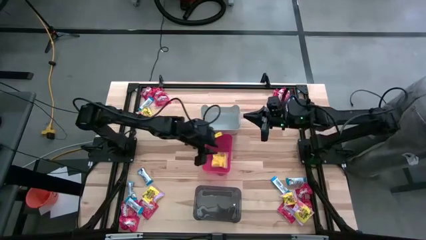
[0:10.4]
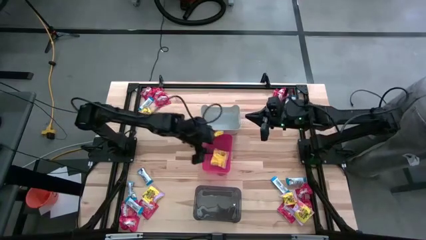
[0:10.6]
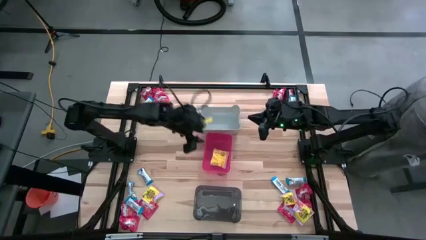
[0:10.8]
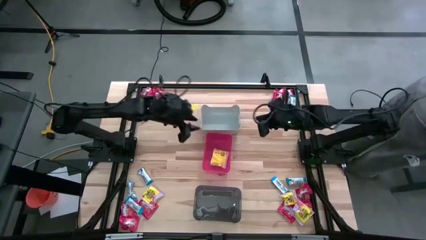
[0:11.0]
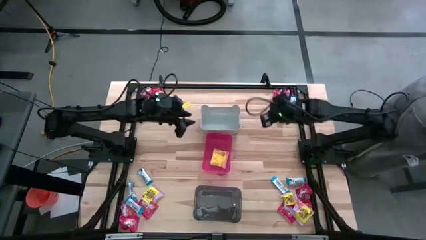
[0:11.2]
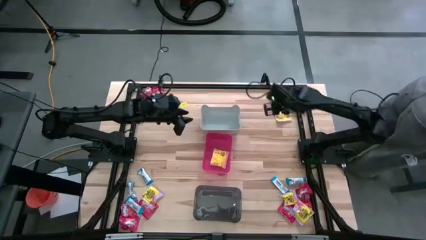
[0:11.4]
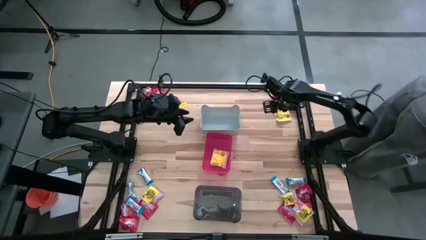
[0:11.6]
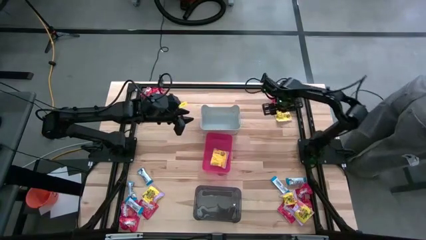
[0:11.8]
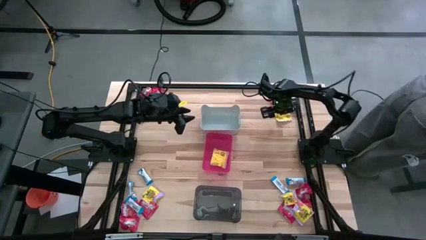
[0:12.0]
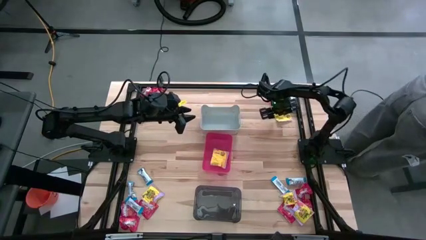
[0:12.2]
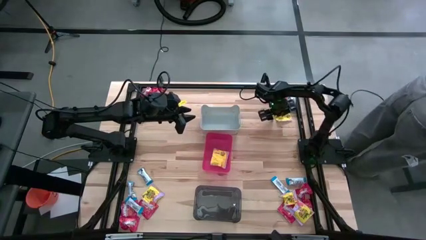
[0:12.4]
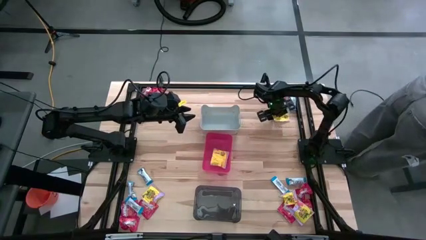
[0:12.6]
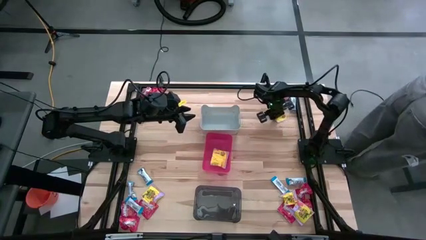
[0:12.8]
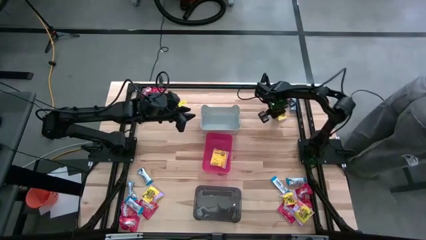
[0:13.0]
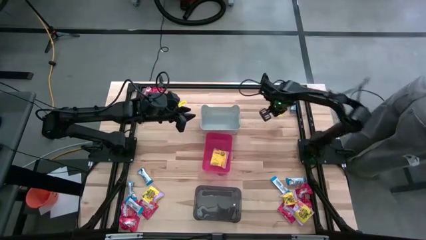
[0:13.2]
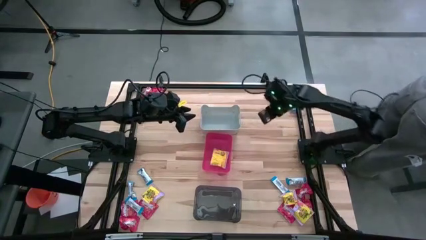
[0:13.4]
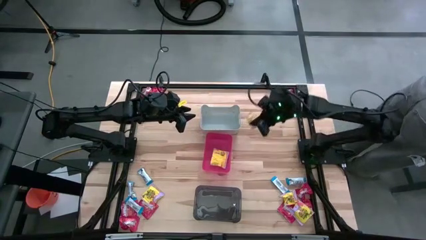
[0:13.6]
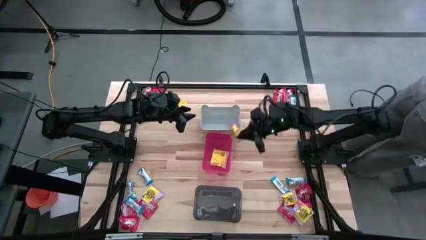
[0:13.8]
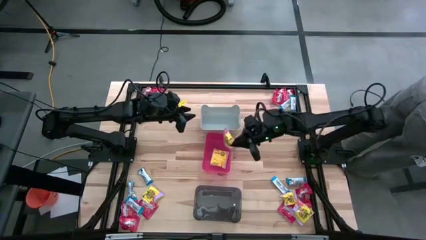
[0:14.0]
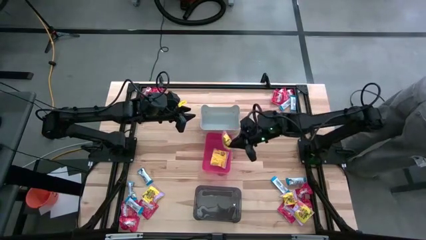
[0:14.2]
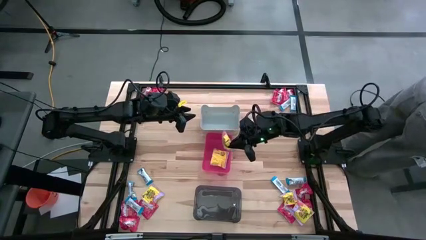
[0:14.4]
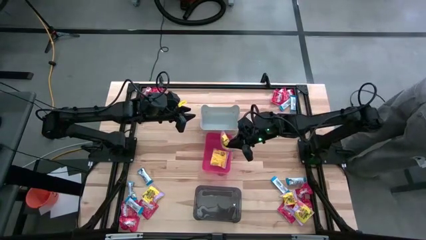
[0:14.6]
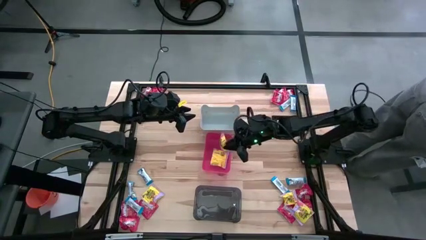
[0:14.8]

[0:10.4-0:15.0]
Task: Sort candy
Put the yellow candy into the red bin

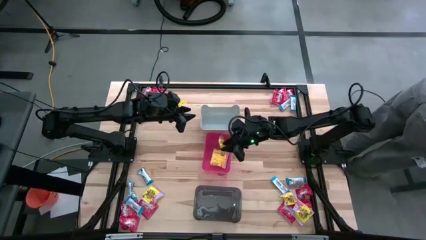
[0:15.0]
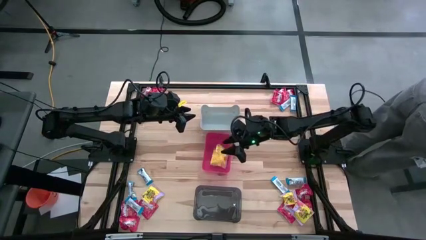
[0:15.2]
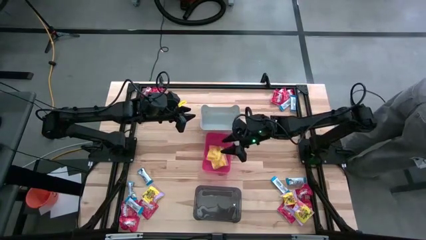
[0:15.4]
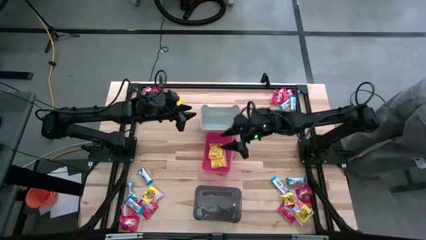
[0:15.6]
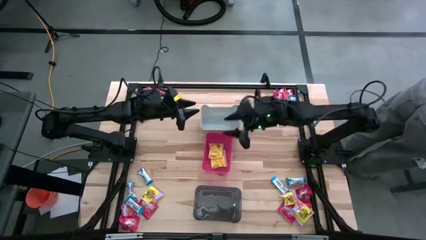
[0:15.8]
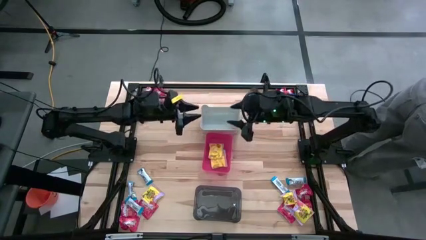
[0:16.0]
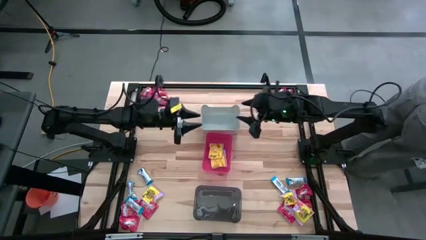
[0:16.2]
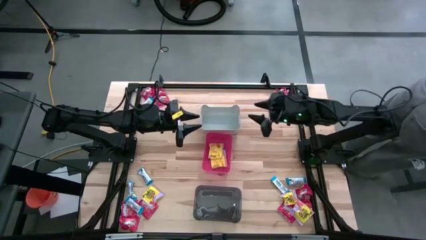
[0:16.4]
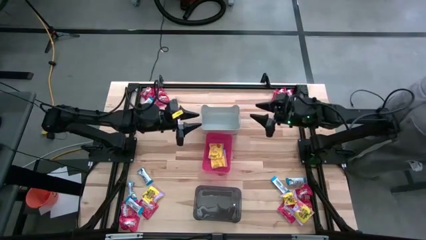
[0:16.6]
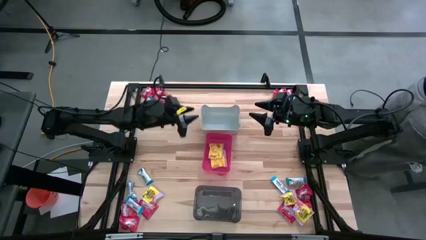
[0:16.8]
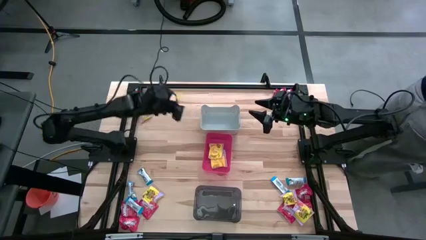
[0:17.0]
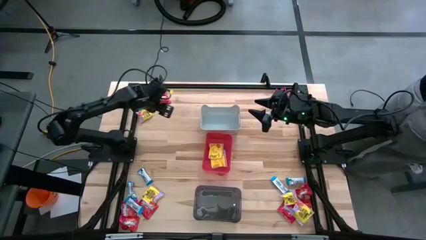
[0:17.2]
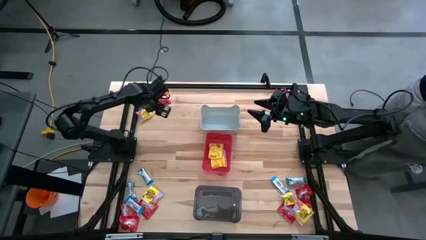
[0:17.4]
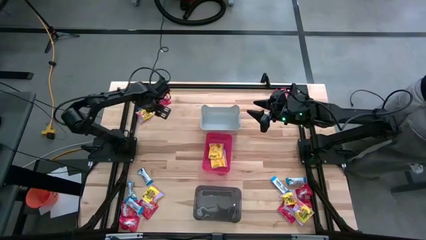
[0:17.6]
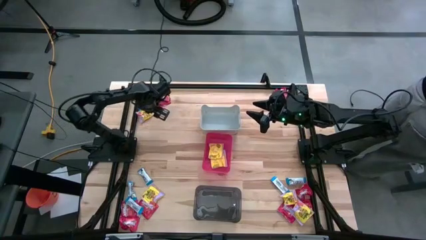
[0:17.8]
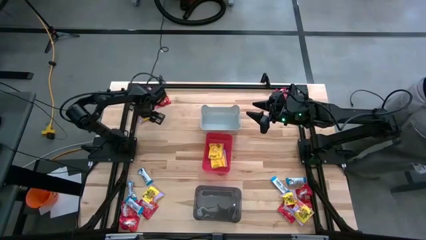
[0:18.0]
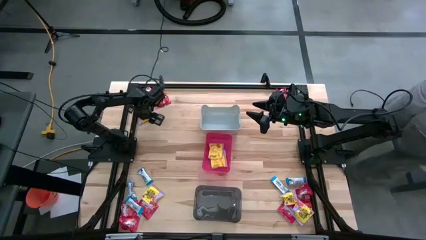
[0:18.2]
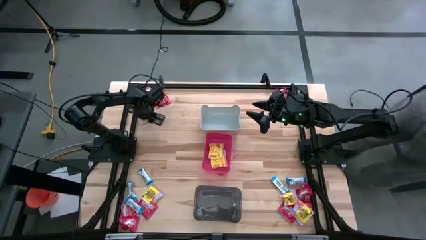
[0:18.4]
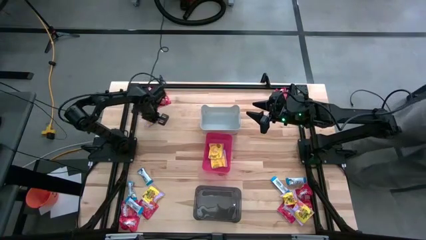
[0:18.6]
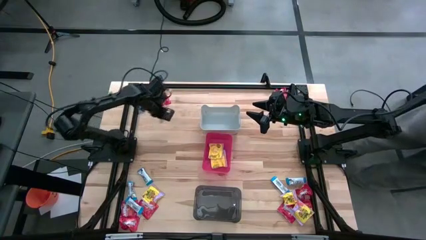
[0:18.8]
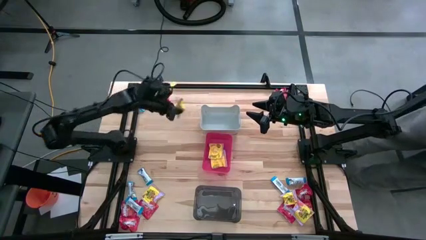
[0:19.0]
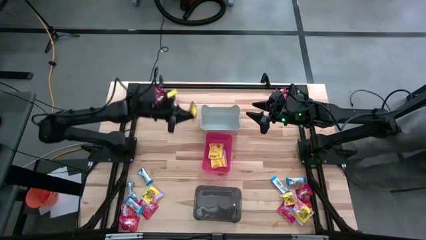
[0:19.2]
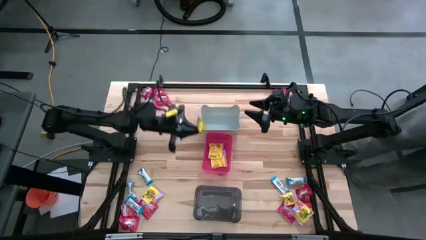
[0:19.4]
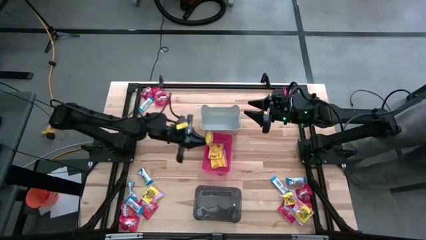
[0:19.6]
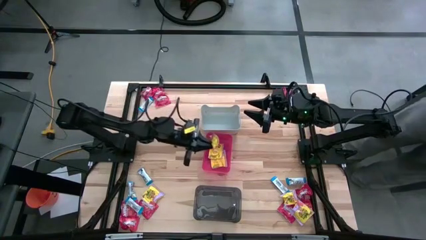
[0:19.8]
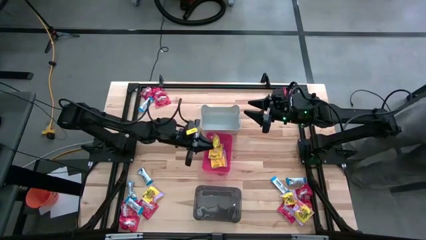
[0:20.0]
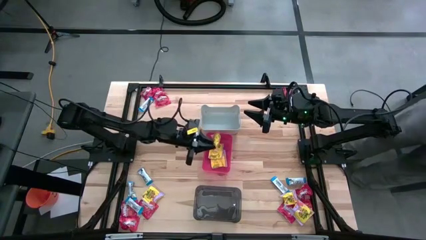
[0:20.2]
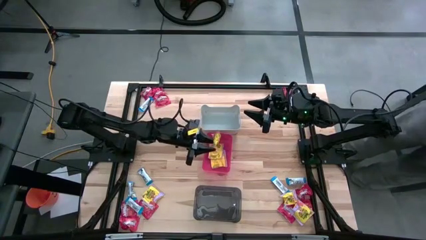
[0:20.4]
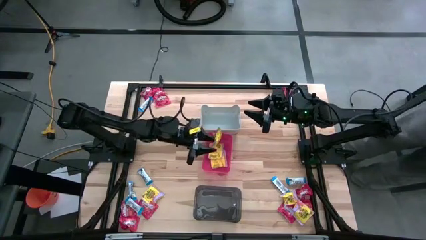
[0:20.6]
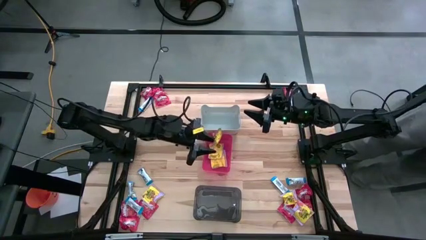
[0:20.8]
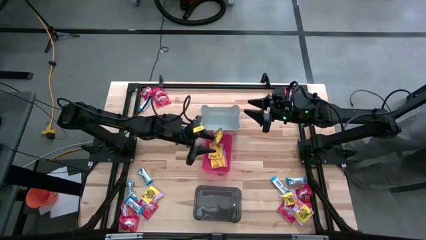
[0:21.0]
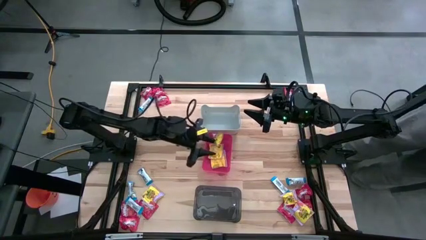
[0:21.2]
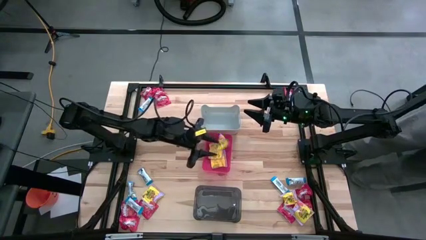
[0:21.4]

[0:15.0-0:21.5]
Put the yellow candy into the red bin

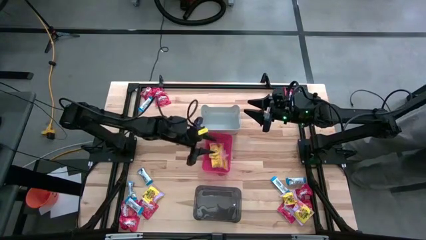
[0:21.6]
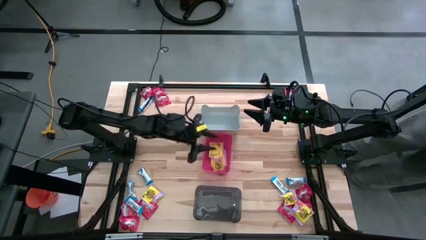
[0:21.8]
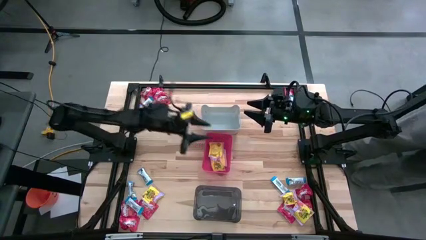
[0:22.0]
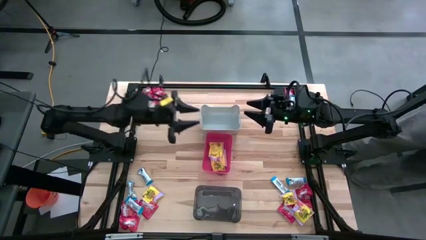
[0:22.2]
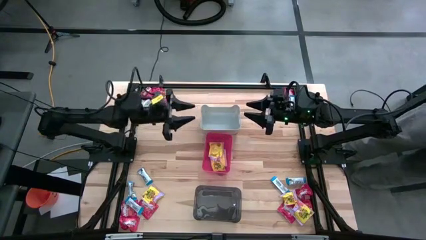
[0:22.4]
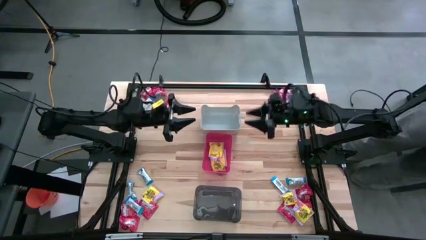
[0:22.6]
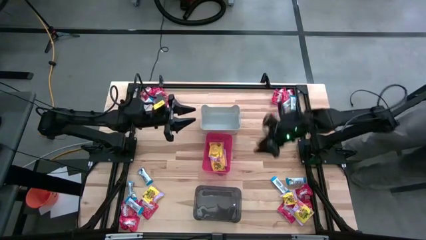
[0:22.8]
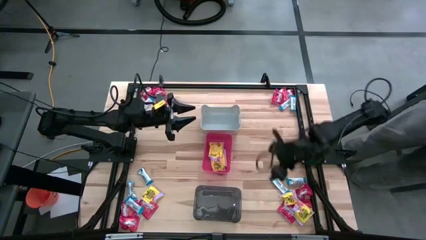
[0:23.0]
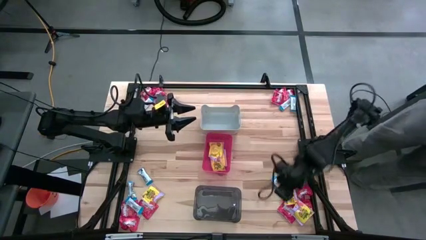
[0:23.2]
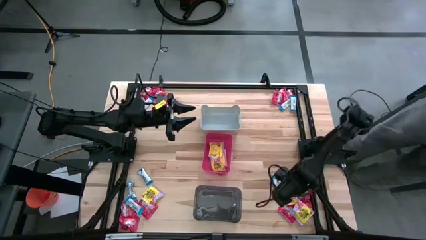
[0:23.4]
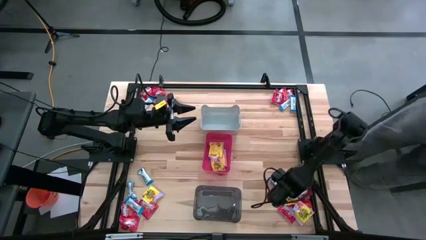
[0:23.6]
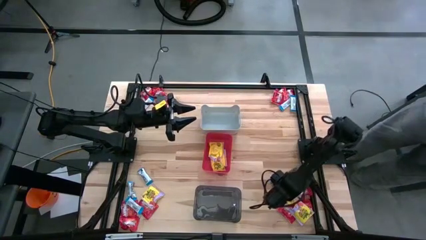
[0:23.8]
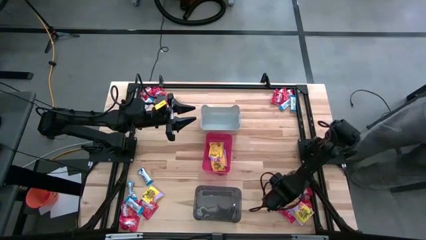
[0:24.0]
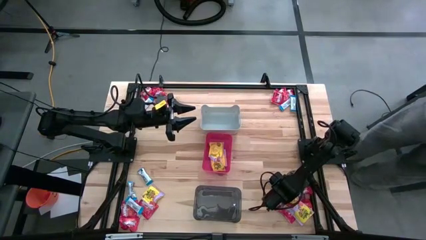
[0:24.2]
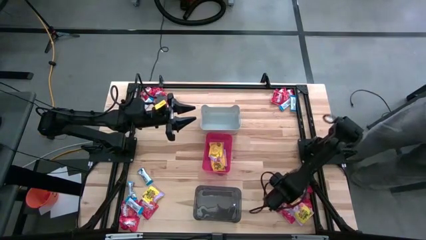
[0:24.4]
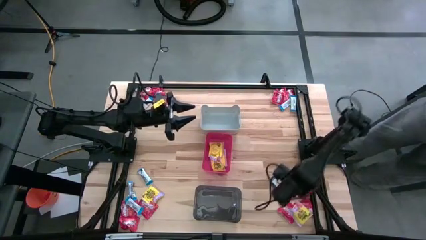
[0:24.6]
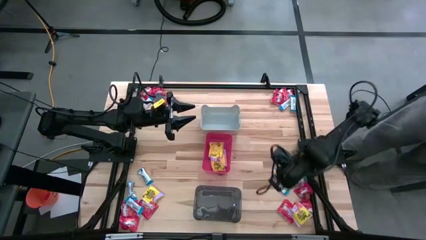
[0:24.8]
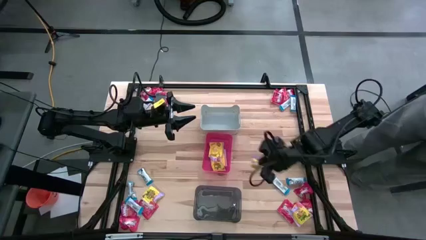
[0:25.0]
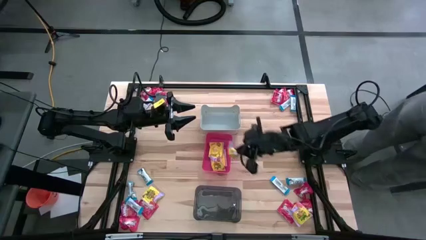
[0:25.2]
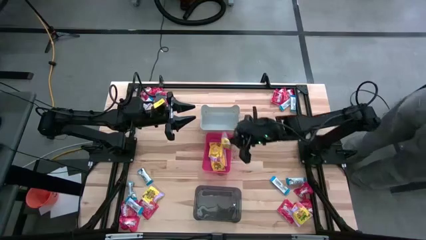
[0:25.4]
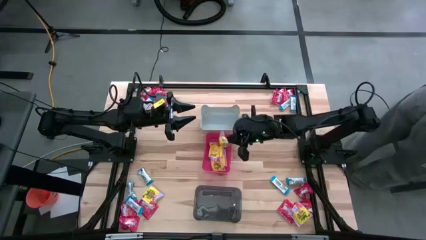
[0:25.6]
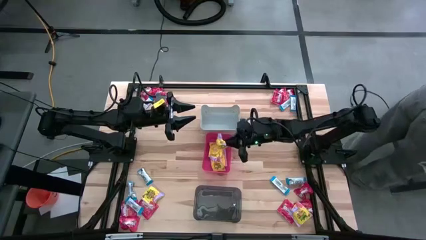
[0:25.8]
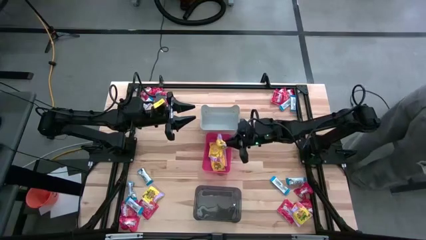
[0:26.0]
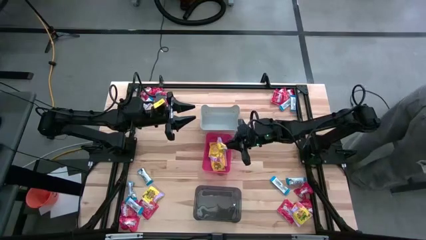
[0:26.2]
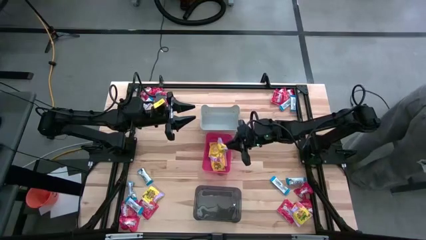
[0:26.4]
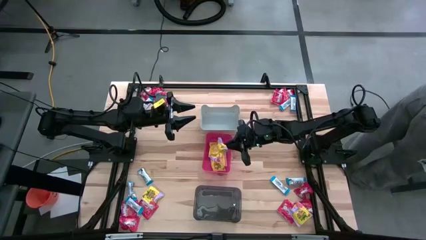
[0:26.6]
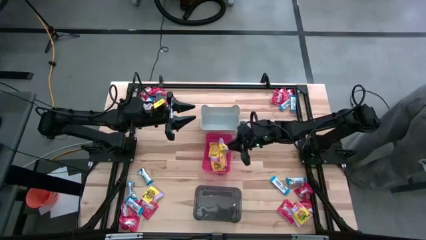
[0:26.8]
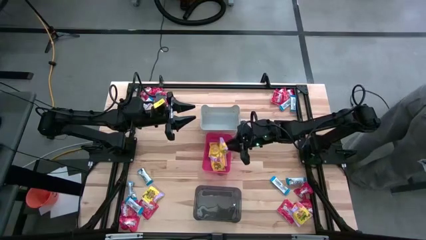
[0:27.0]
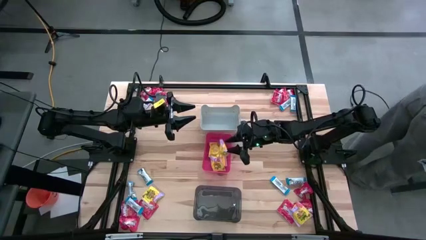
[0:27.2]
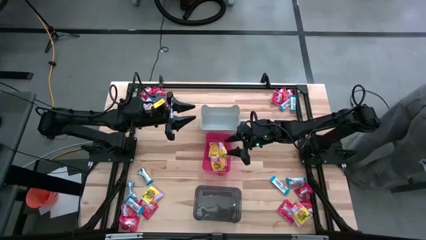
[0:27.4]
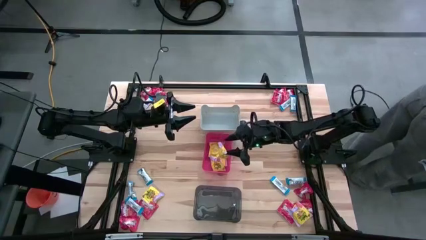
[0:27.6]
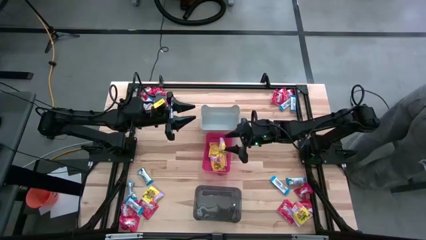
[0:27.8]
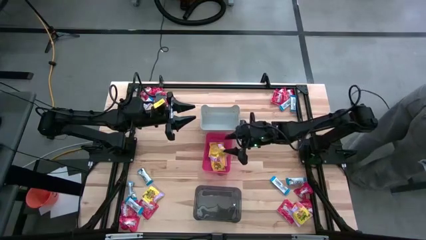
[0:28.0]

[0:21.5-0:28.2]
Put the yellow candy into the red bin
